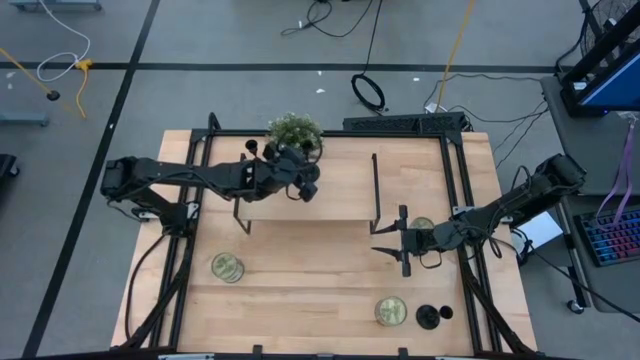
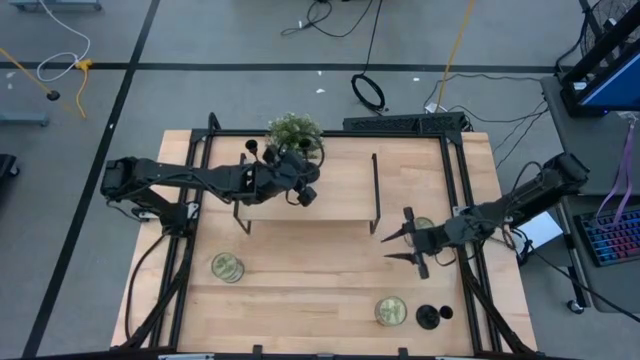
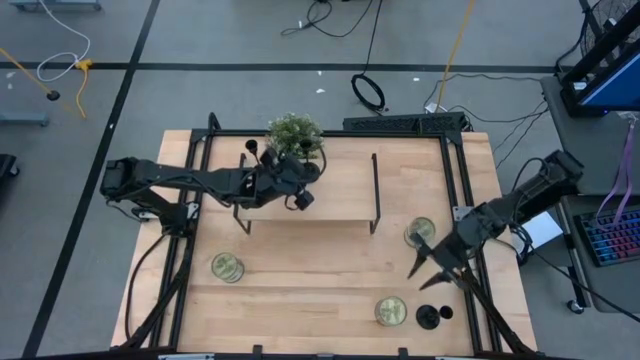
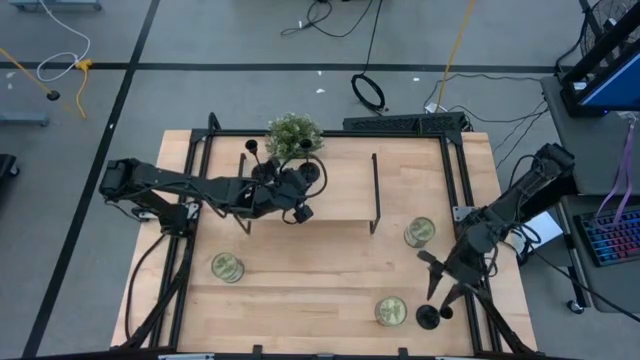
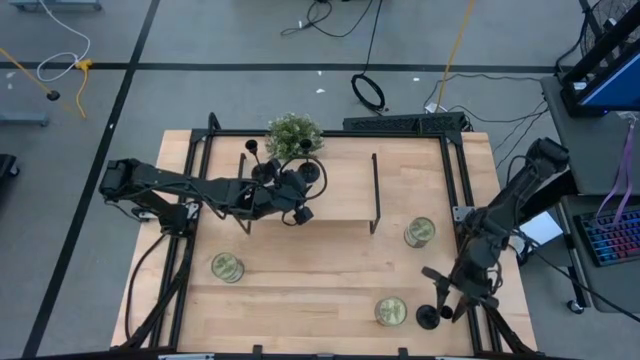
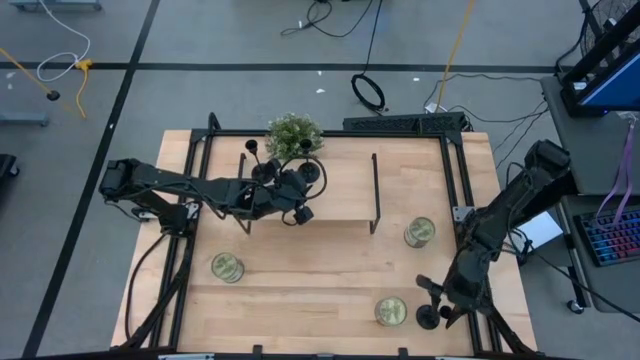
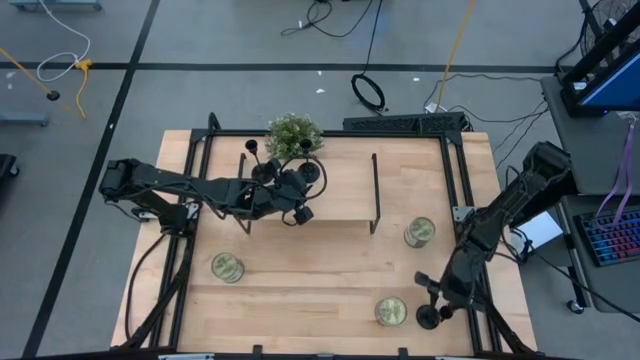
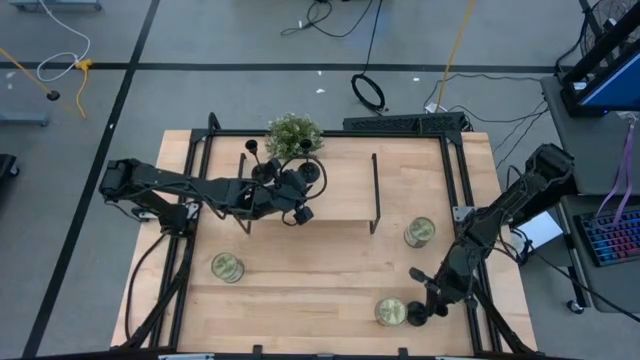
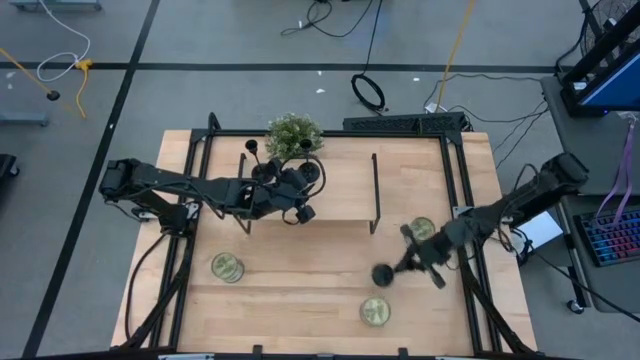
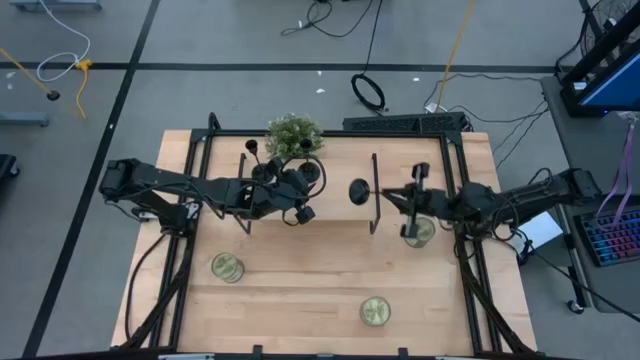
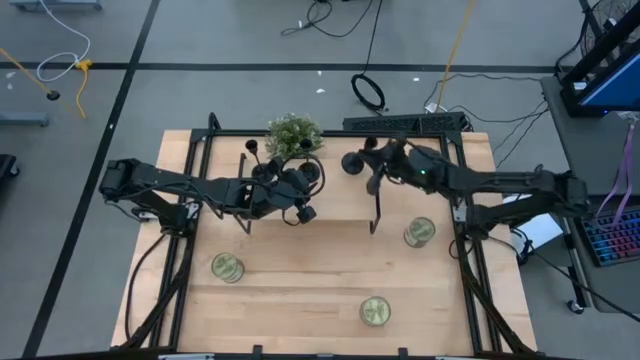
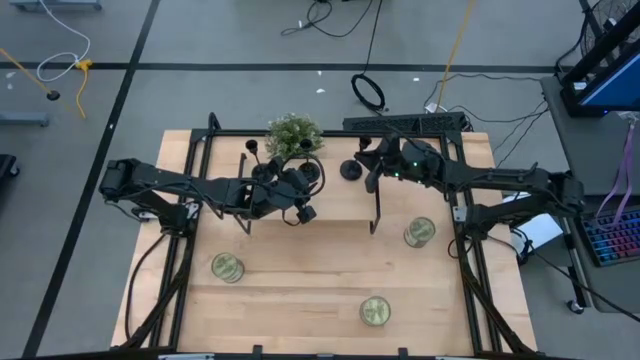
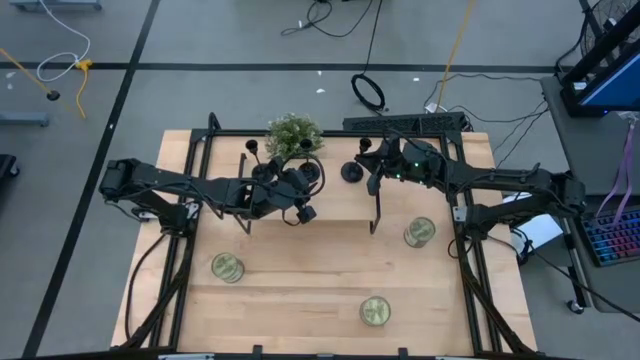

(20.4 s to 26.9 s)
Task: Pick & Place candle stick holders
Put the black candle holder on the shelf aligned with the black candle holders

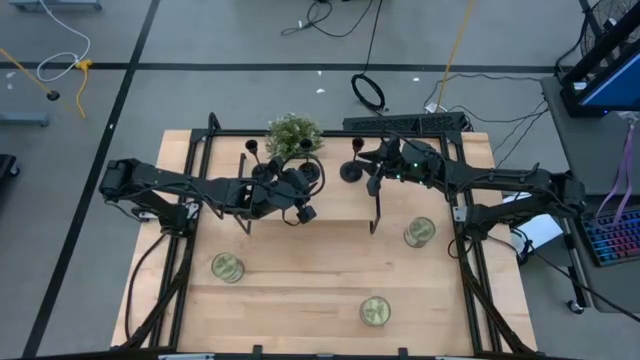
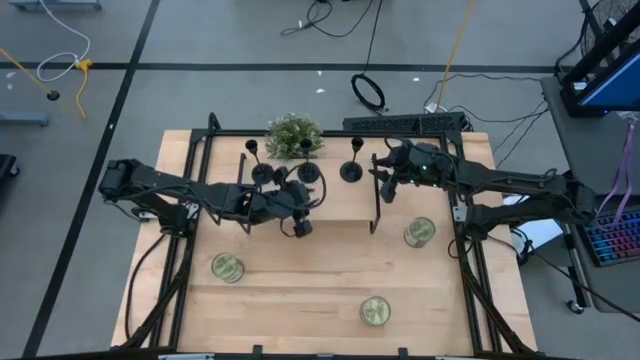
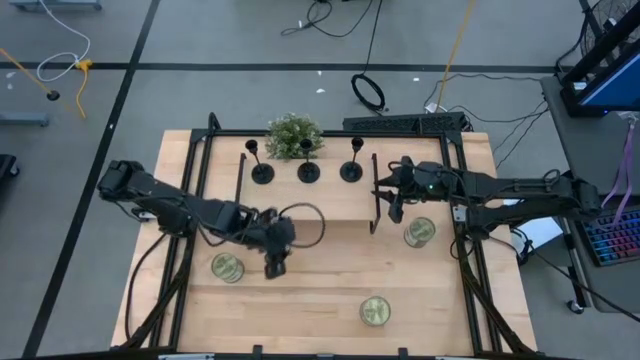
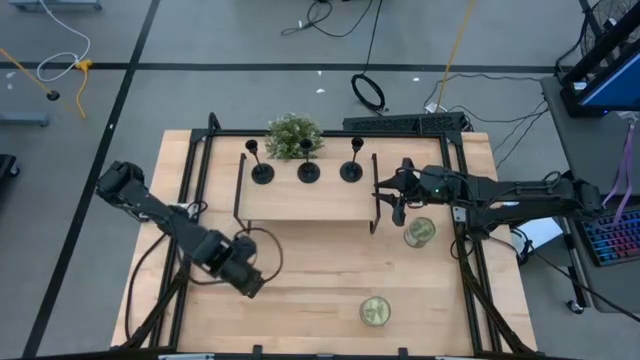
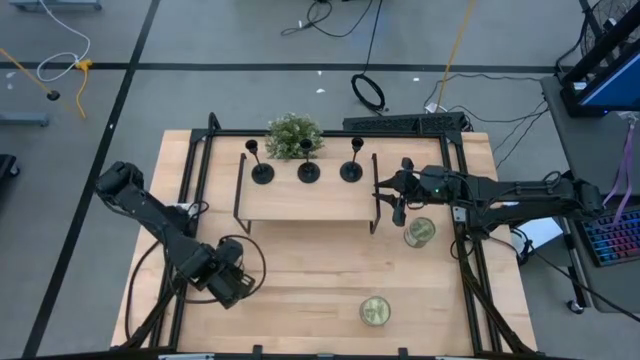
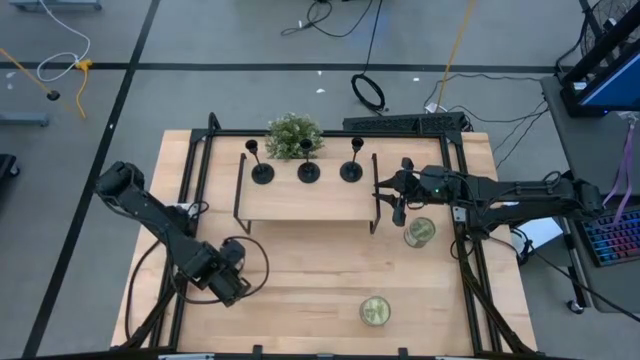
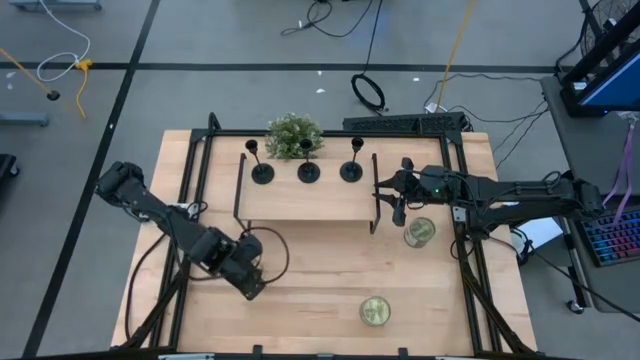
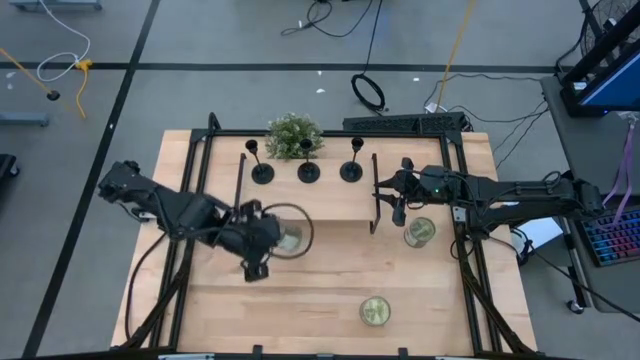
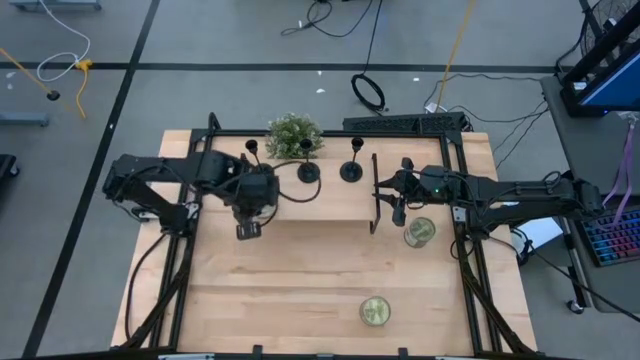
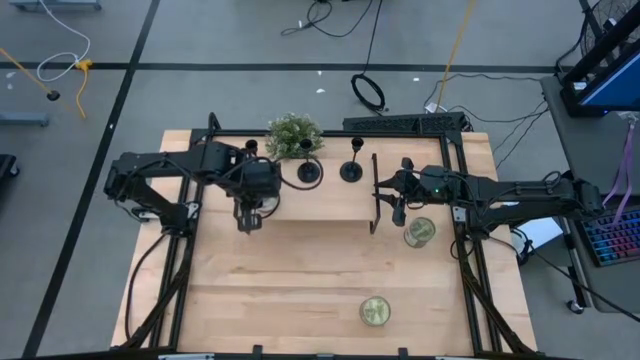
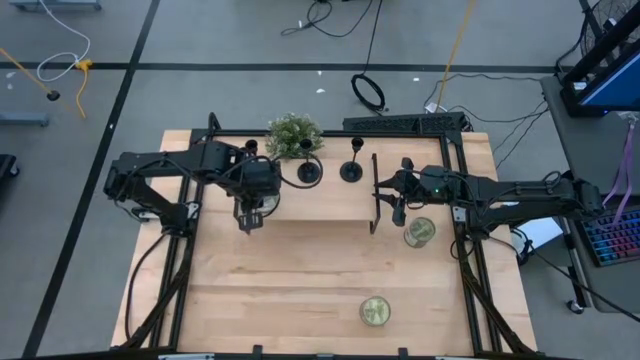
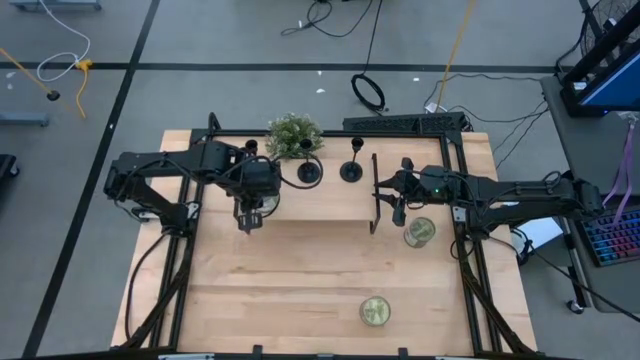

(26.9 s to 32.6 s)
Put the middle silver scented candle on the shelf

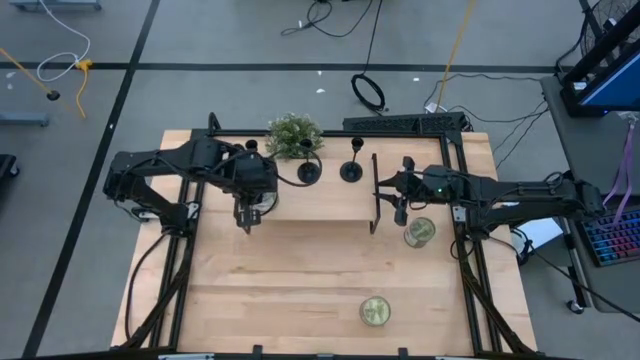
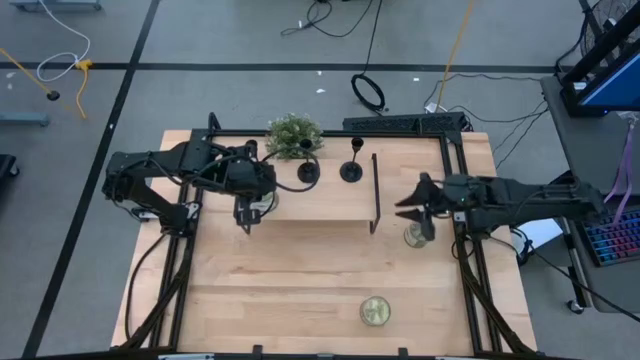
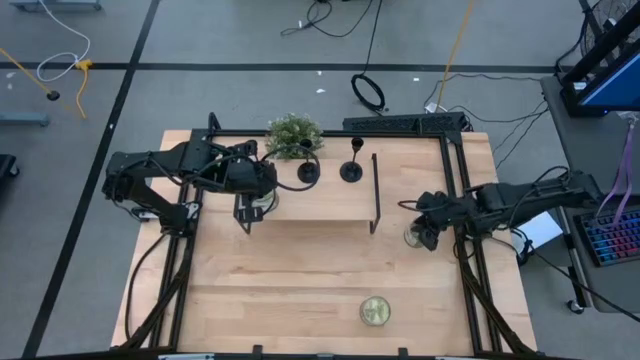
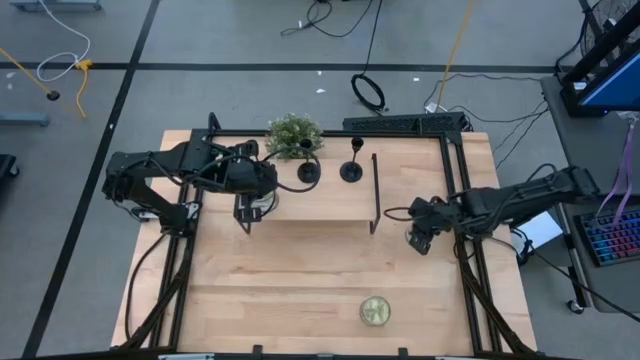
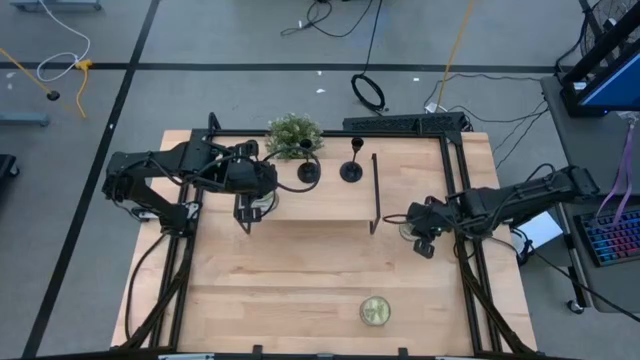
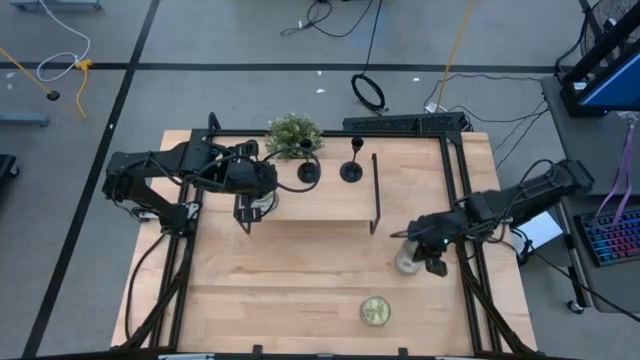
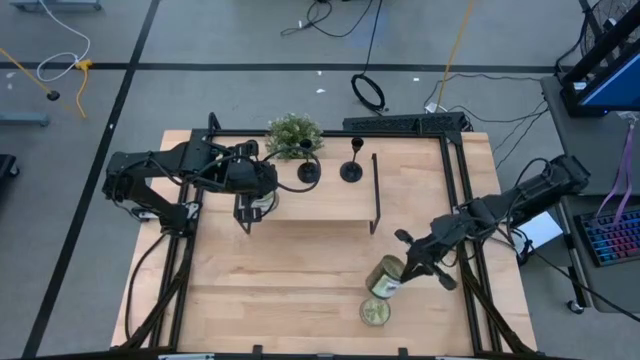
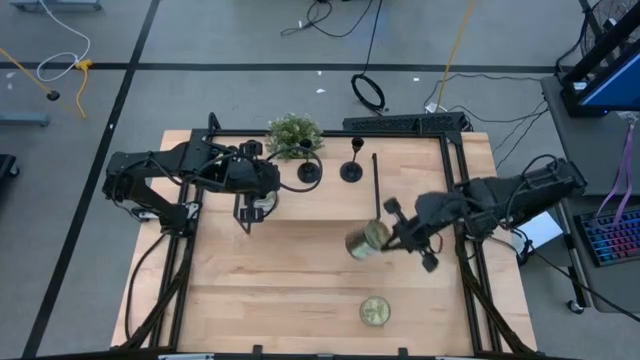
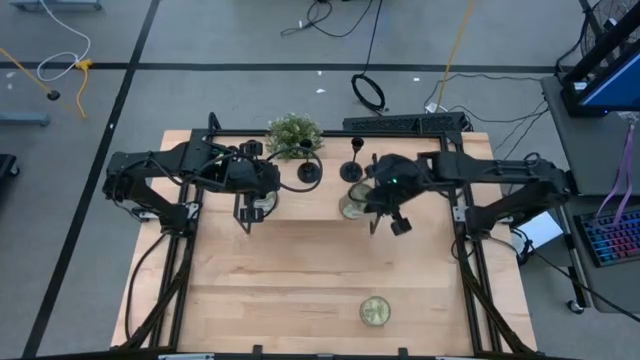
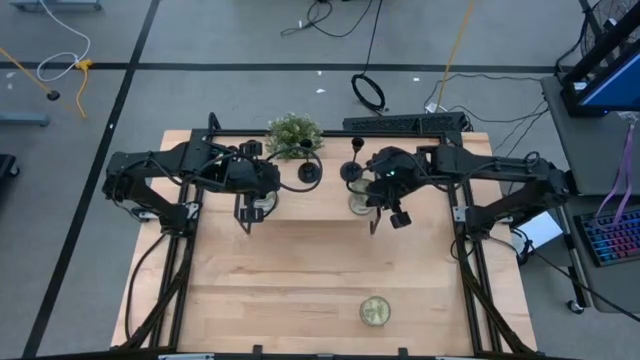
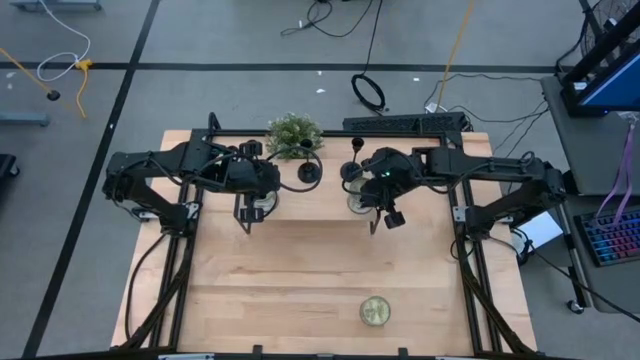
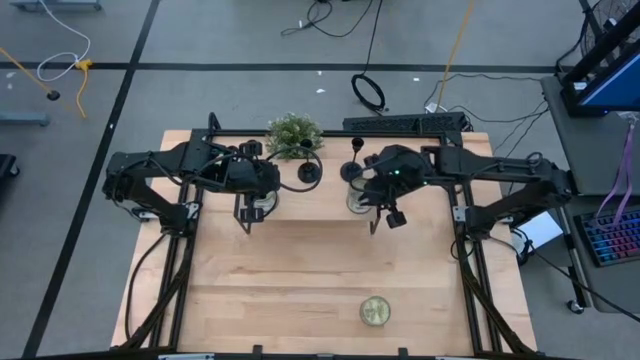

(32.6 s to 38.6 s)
Put the top silver scented candle on the shelf aligned with the silver scented candle

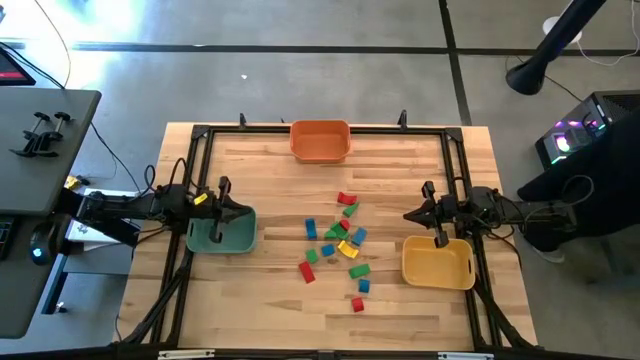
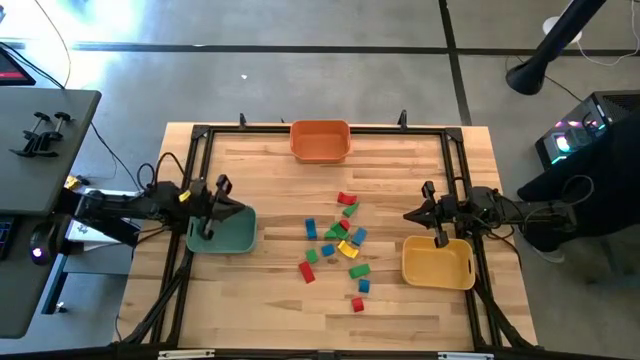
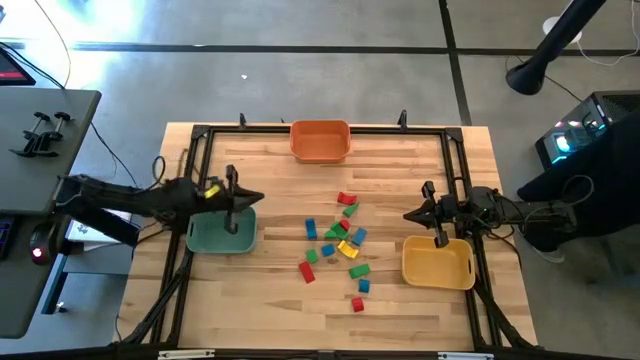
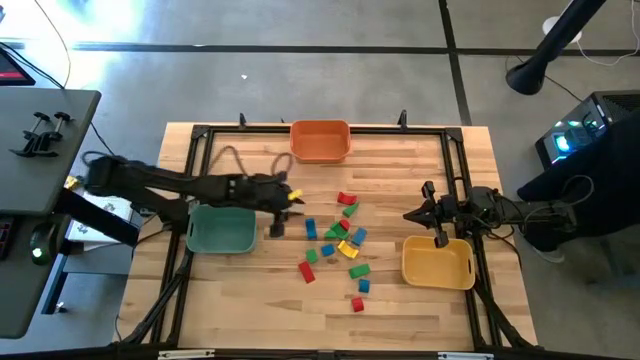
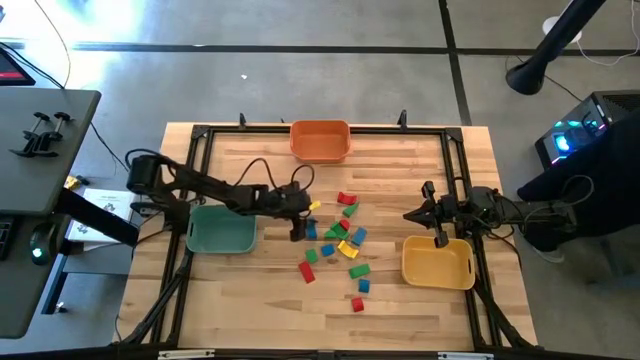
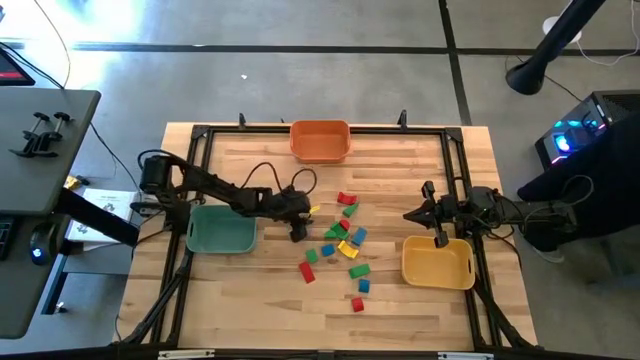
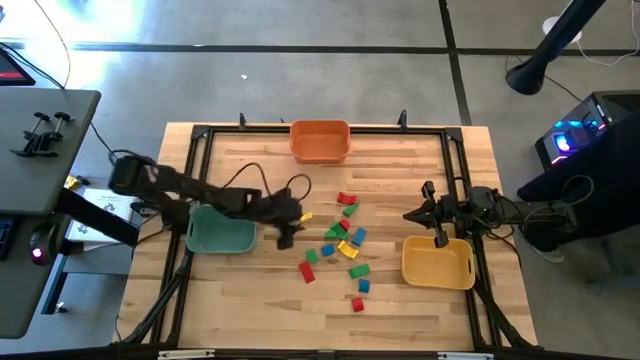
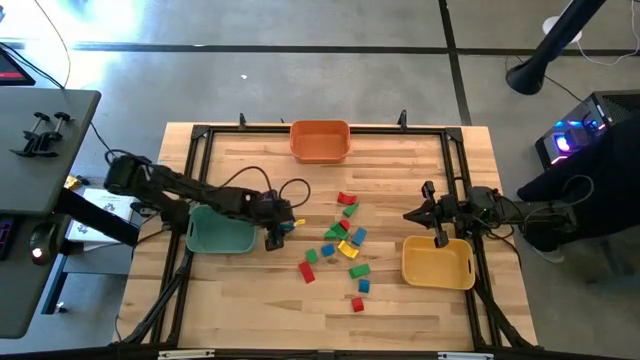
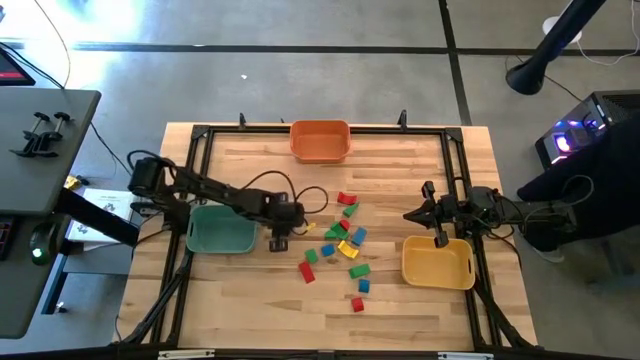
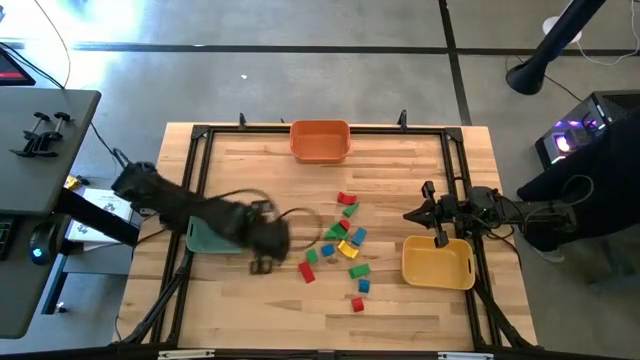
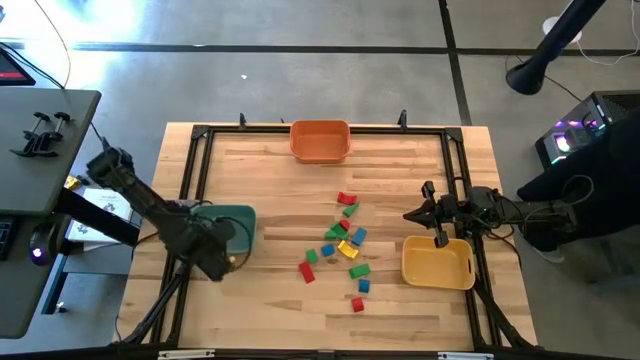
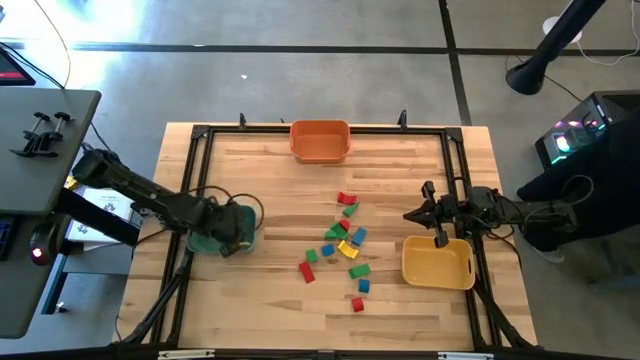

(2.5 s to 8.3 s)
Task: Sort blocks by size
Put the blue arch block into the green bin
